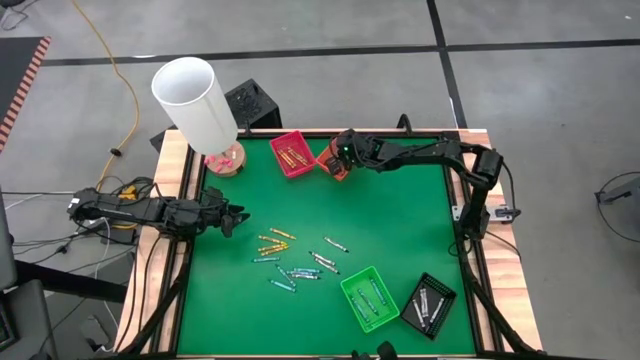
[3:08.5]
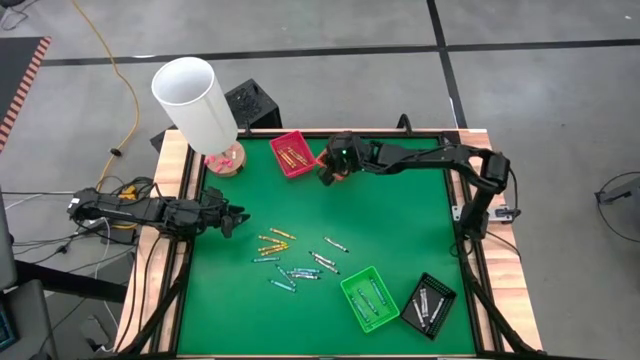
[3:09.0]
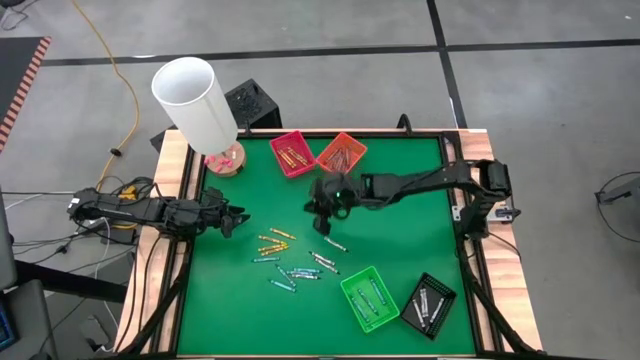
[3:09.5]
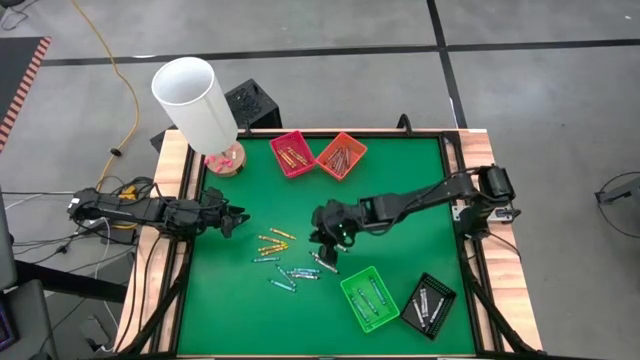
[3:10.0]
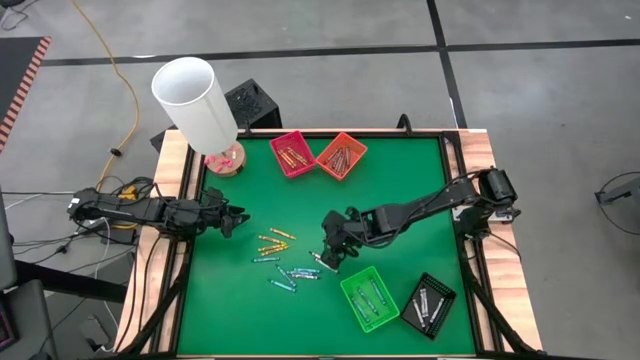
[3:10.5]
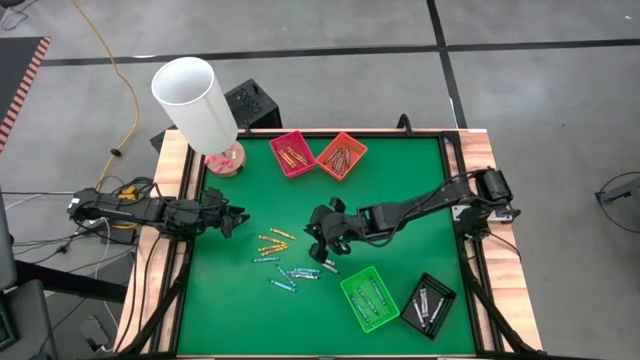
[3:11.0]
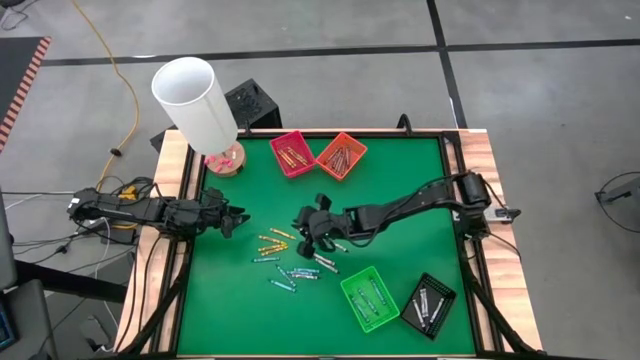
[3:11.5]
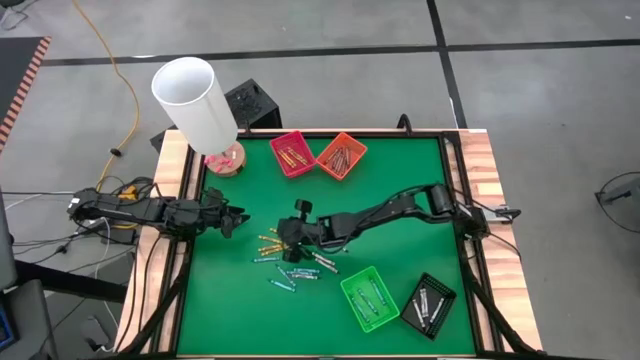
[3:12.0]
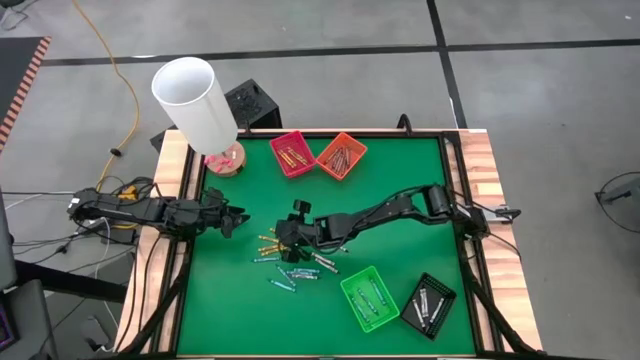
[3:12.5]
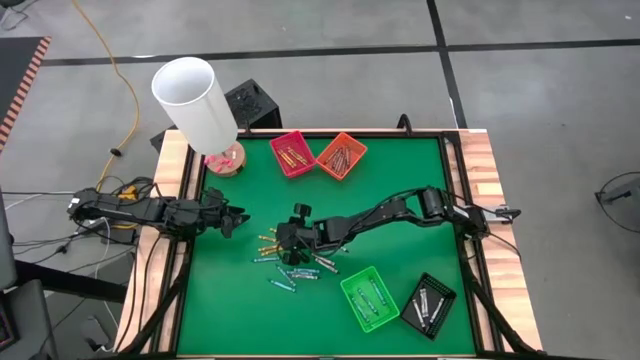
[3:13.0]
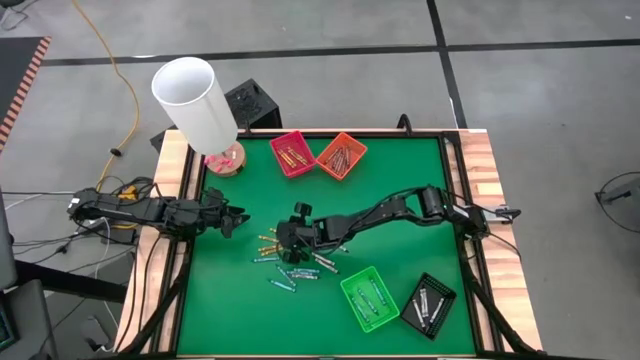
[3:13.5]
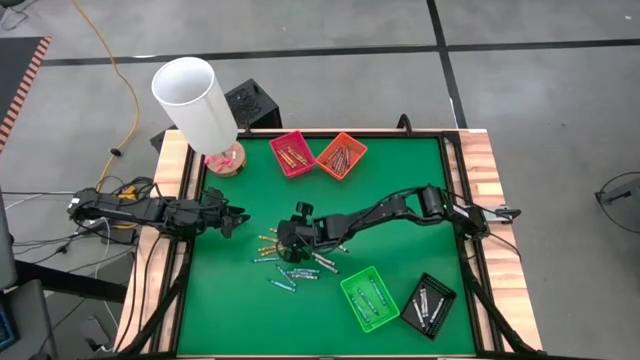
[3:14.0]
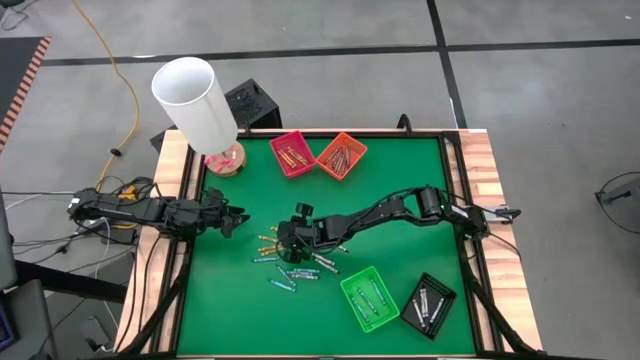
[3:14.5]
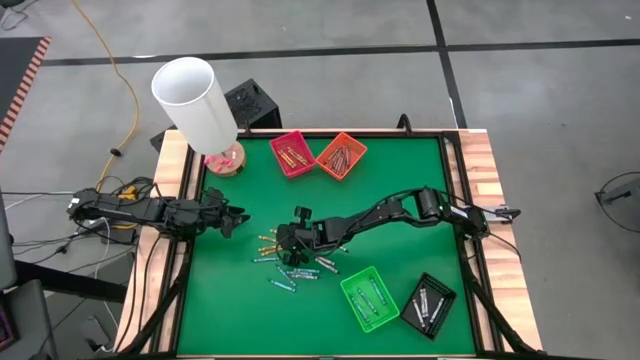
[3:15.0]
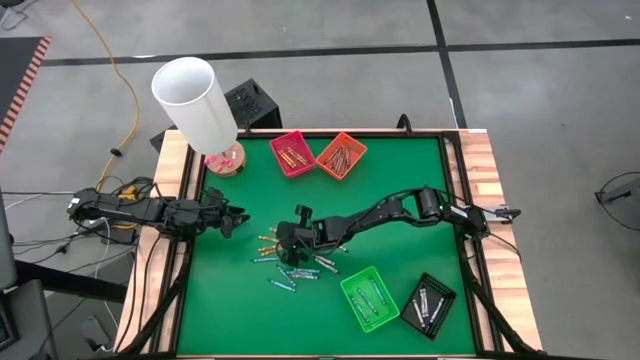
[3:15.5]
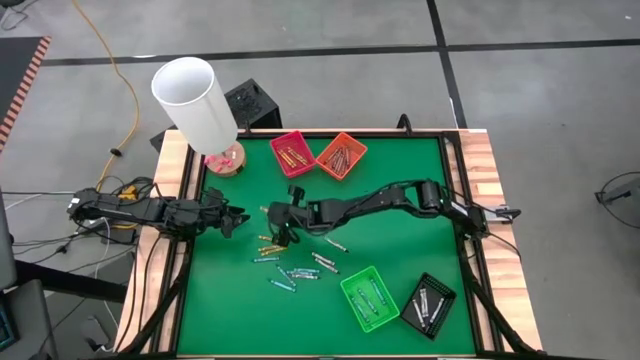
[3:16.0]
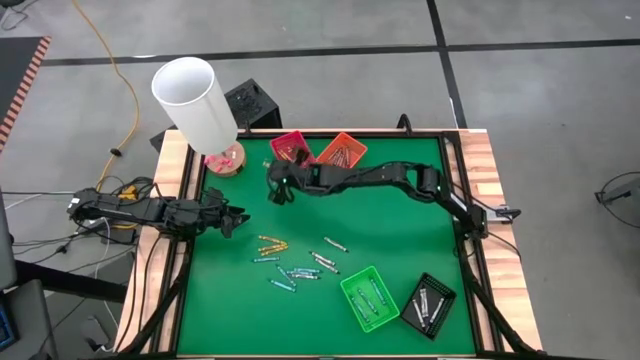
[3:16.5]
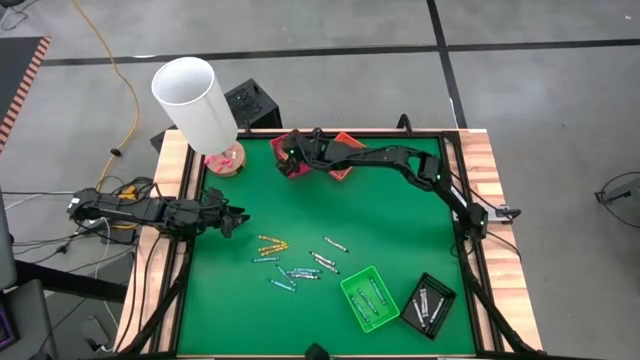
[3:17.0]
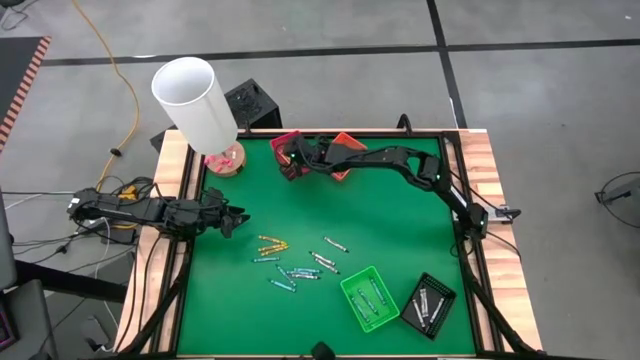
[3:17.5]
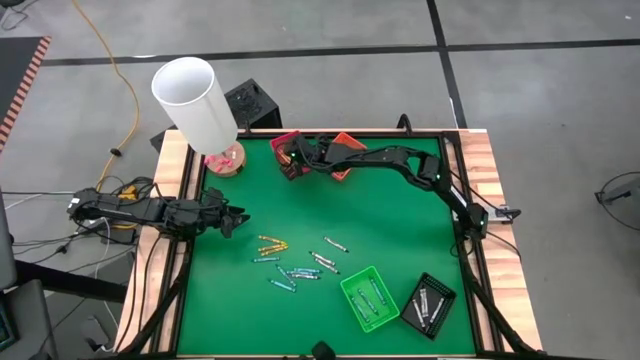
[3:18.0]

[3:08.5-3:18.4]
Task: Sort crayons
Put the light green crayon into the red bin

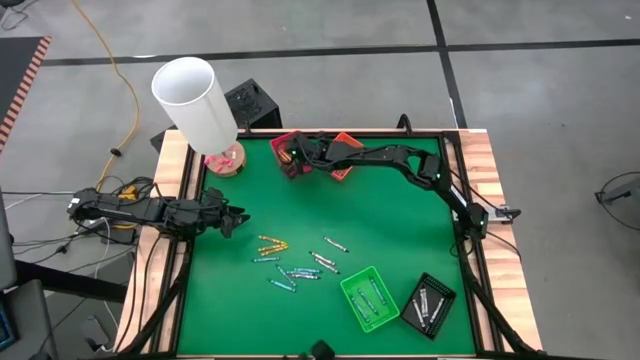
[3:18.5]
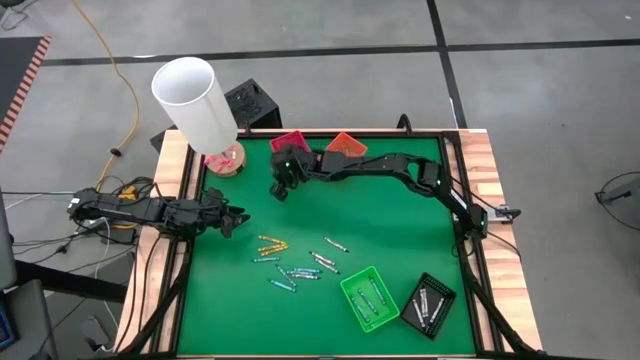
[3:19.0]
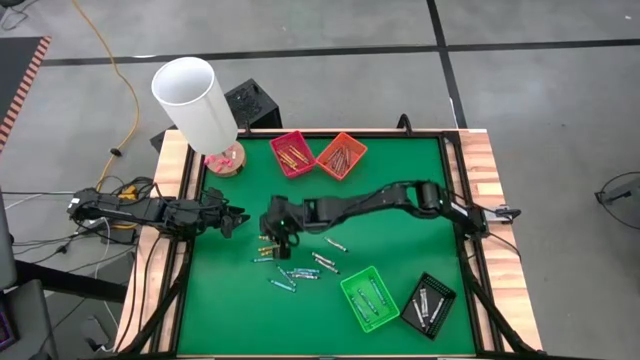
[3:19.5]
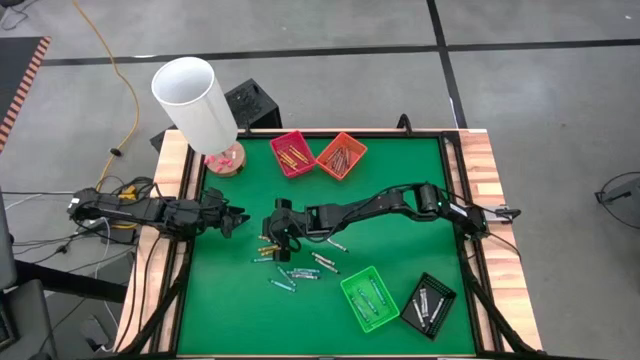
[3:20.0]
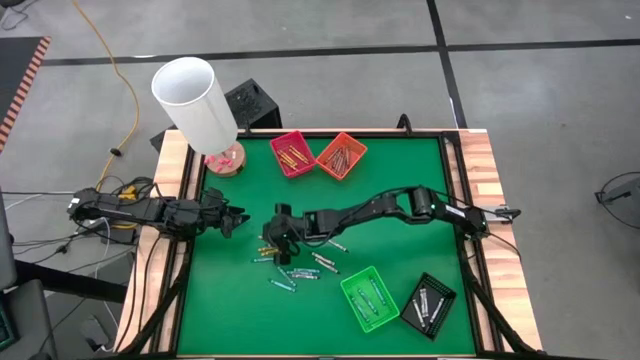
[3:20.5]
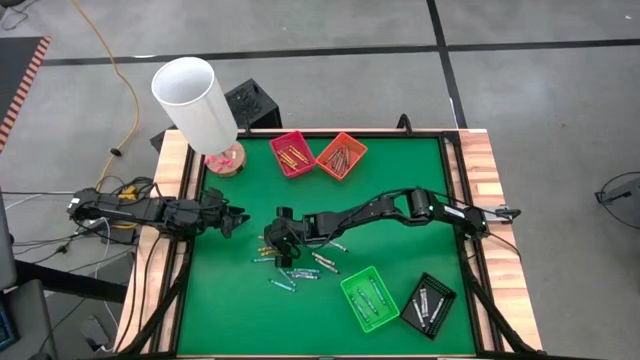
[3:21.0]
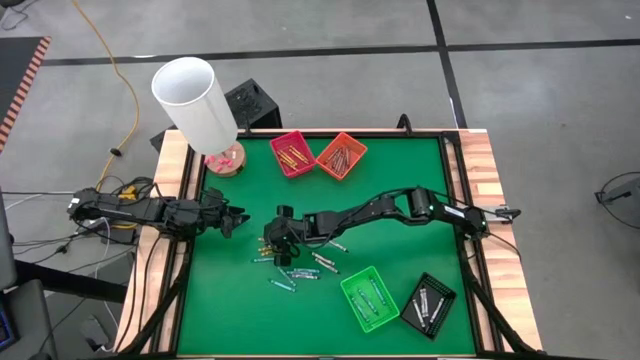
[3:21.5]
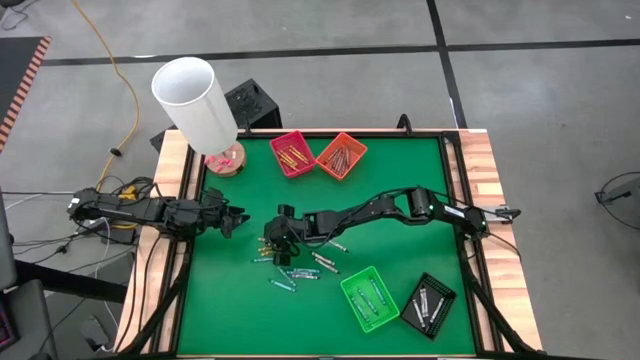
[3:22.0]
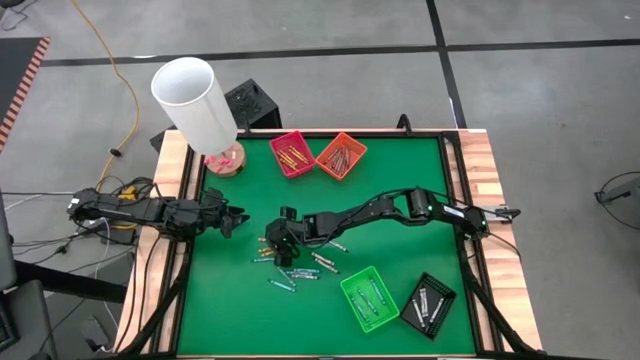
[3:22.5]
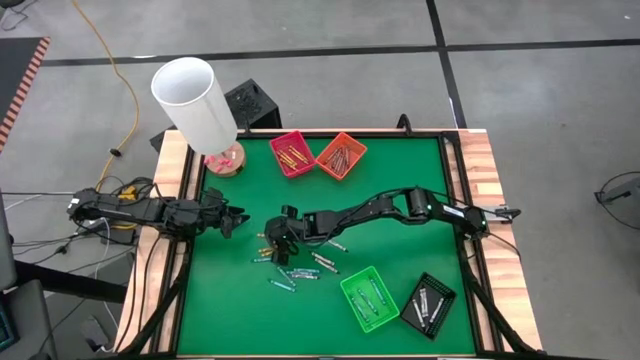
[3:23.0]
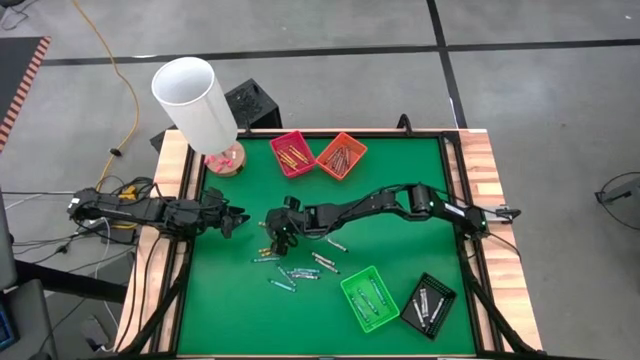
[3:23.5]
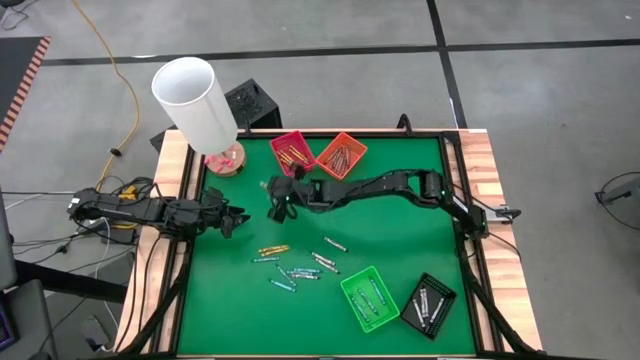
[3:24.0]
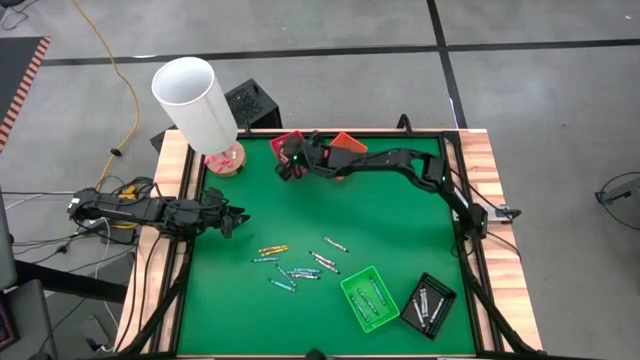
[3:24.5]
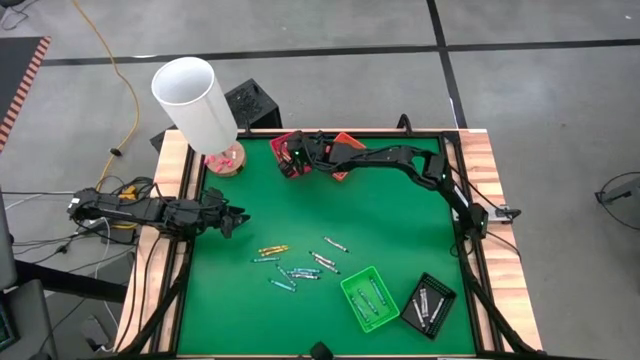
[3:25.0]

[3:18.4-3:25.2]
Put the light green crayon into the red bin

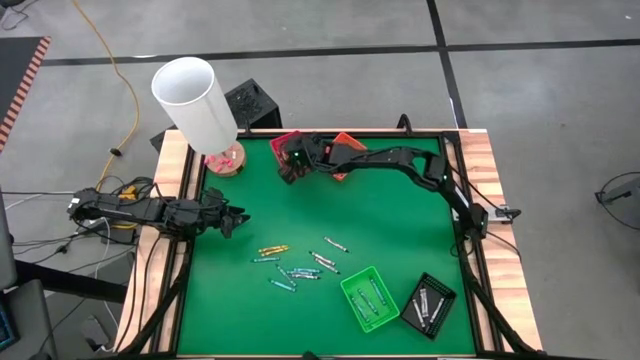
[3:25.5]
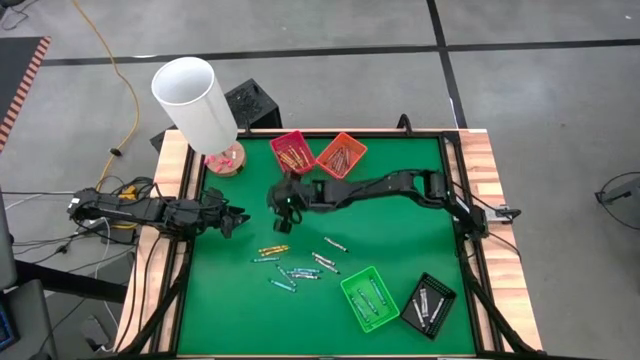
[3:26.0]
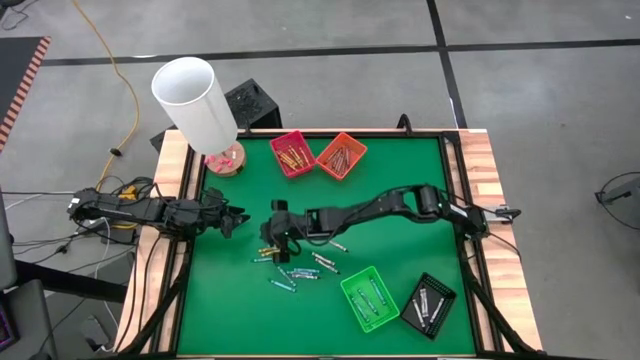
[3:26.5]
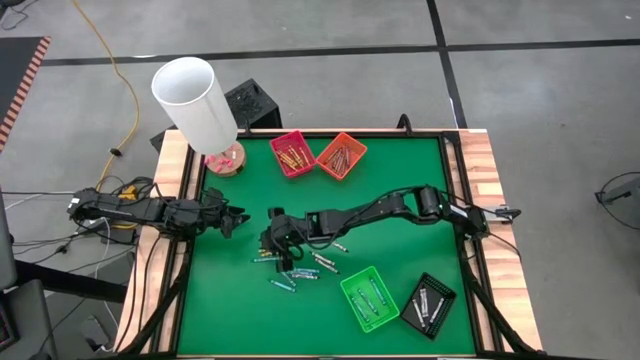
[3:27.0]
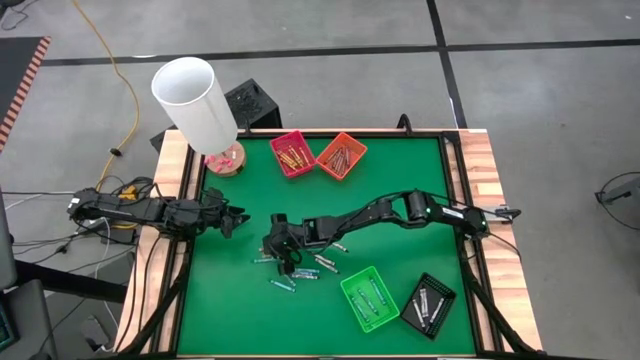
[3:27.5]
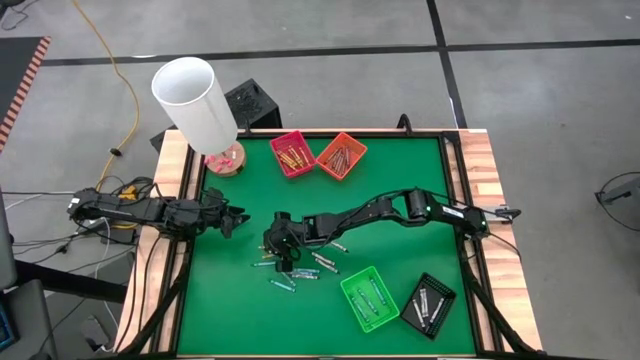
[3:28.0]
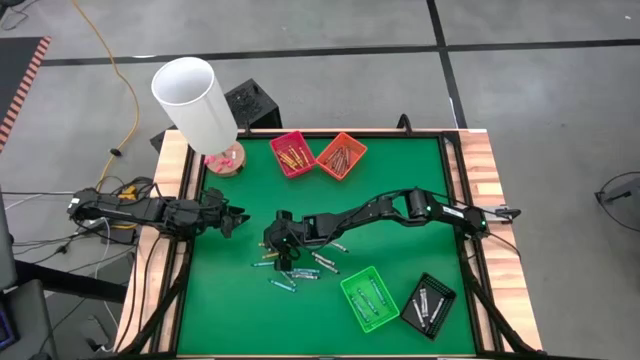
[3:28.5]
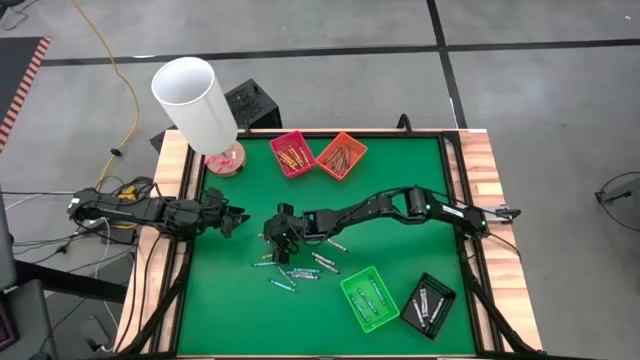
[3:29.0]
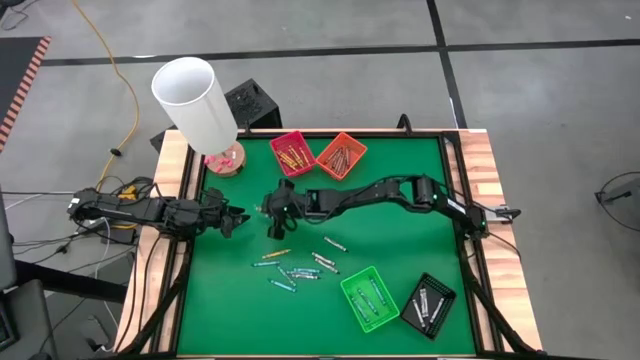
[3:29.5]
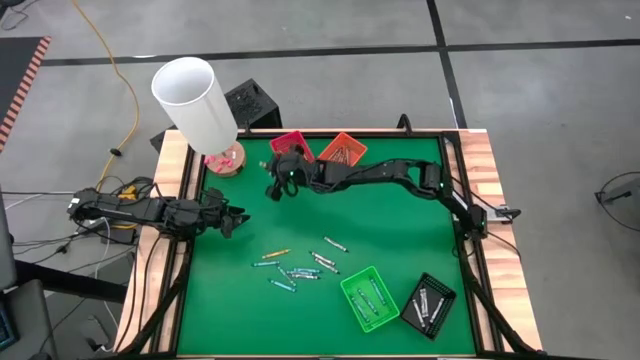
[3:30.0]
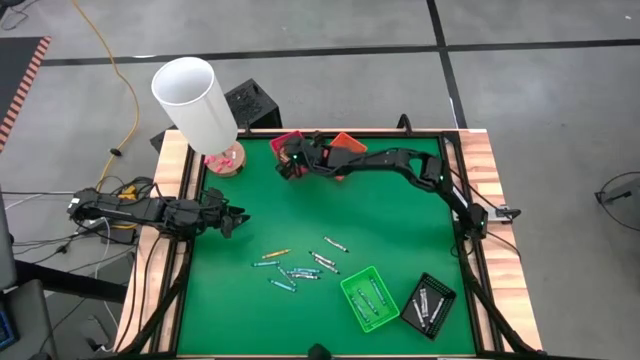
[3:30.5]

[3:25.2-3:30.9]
Put the light green crayon into the red bin
